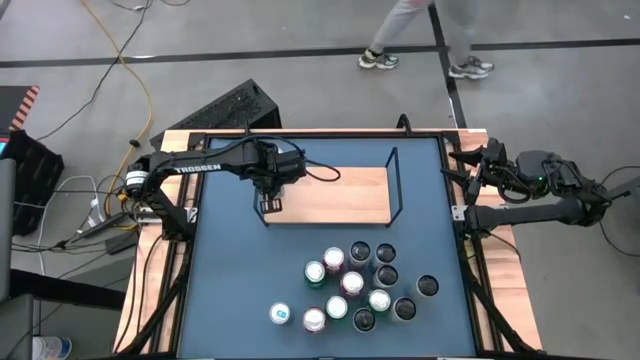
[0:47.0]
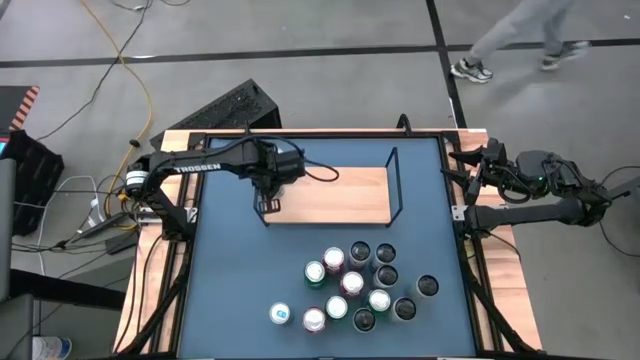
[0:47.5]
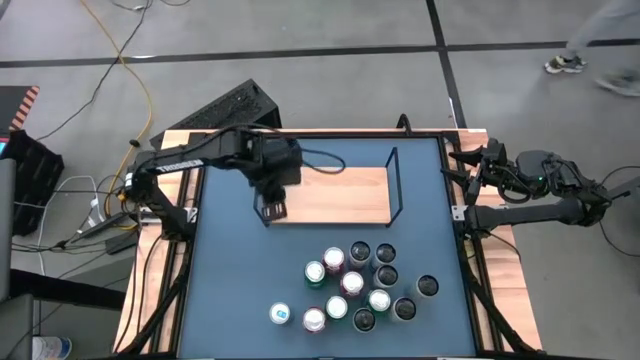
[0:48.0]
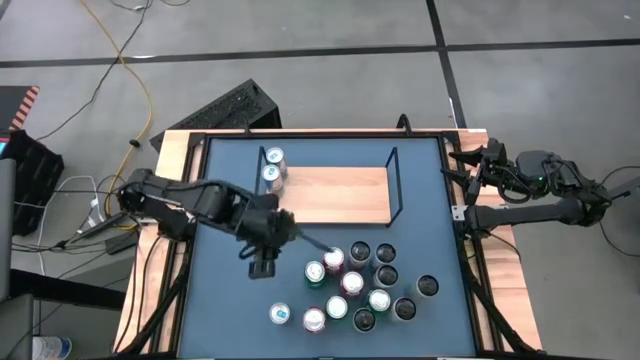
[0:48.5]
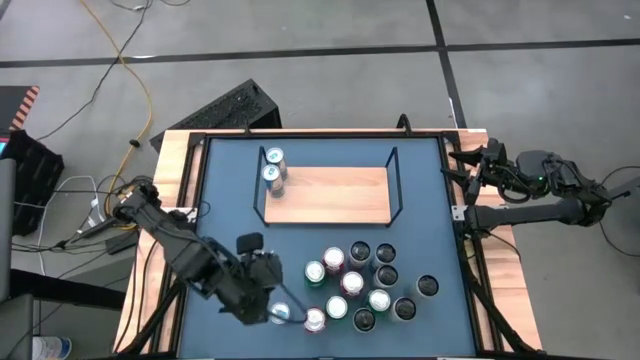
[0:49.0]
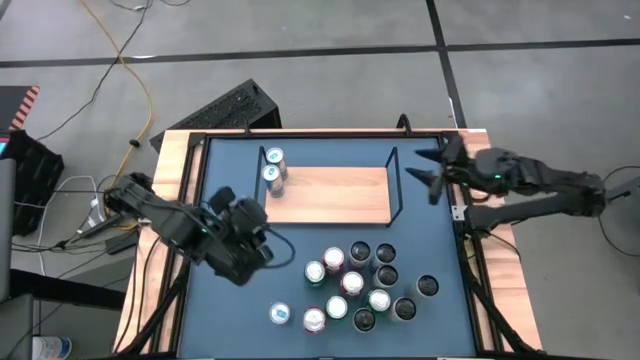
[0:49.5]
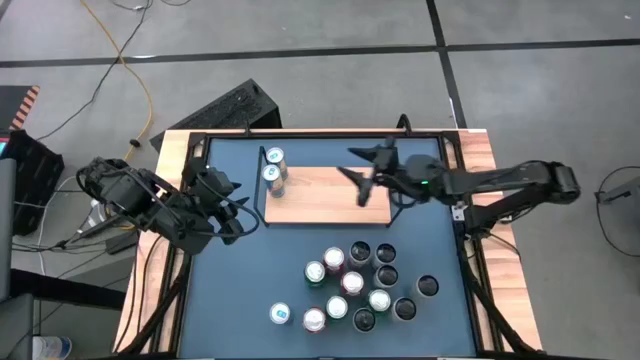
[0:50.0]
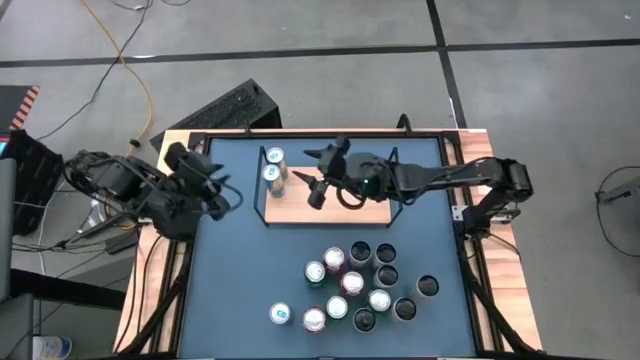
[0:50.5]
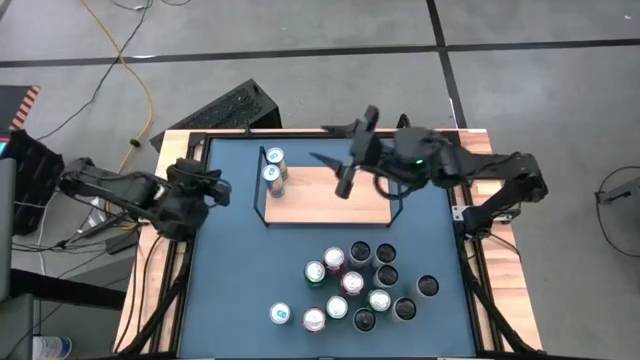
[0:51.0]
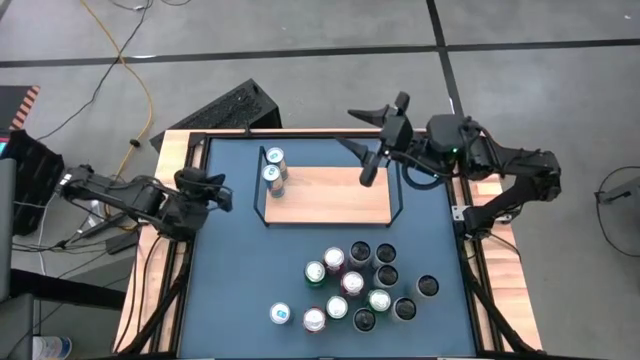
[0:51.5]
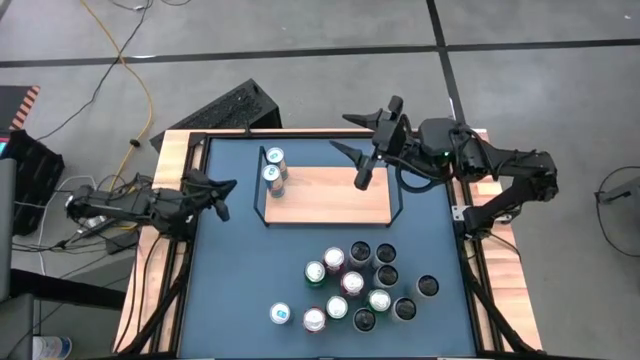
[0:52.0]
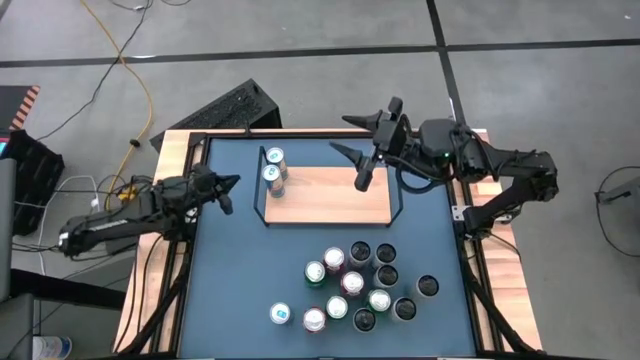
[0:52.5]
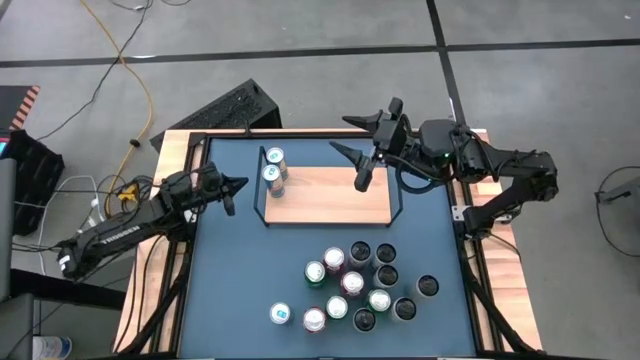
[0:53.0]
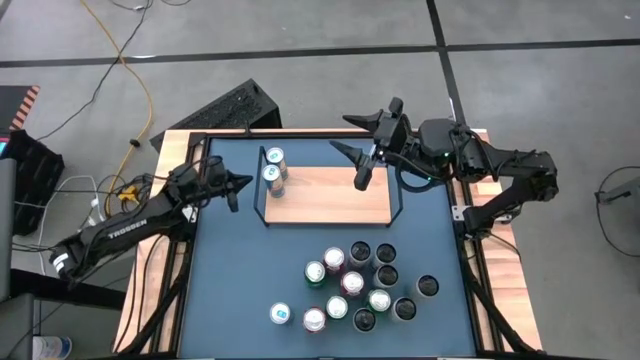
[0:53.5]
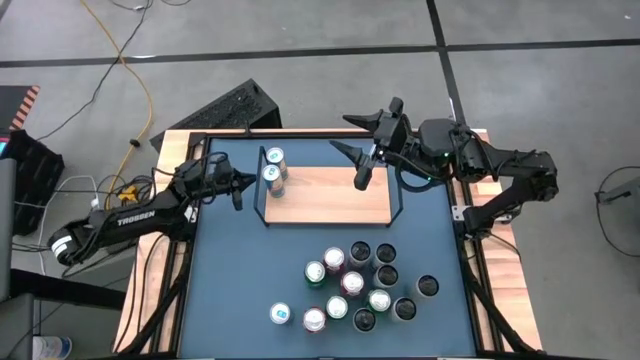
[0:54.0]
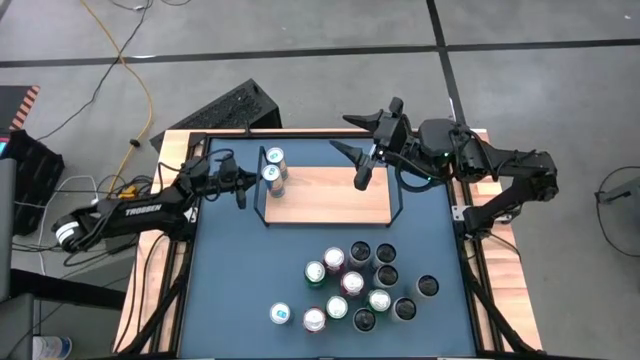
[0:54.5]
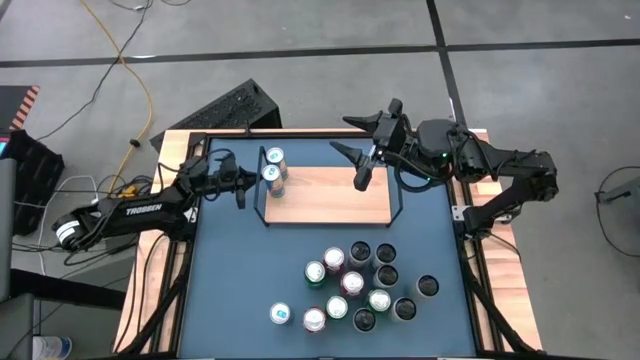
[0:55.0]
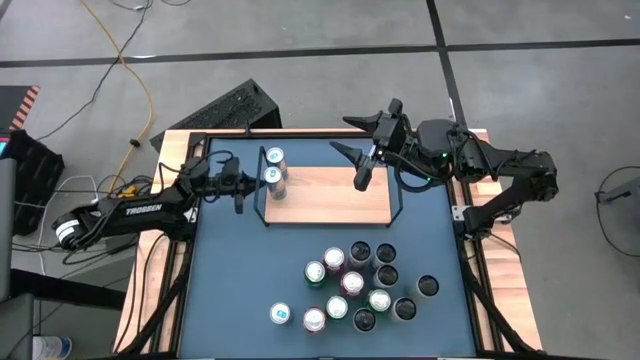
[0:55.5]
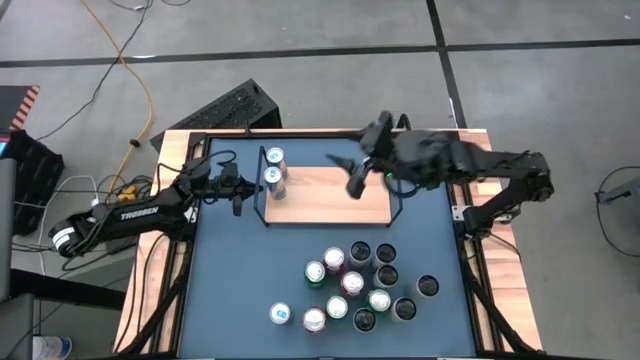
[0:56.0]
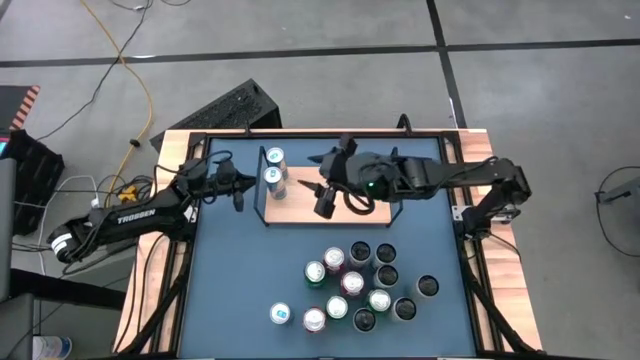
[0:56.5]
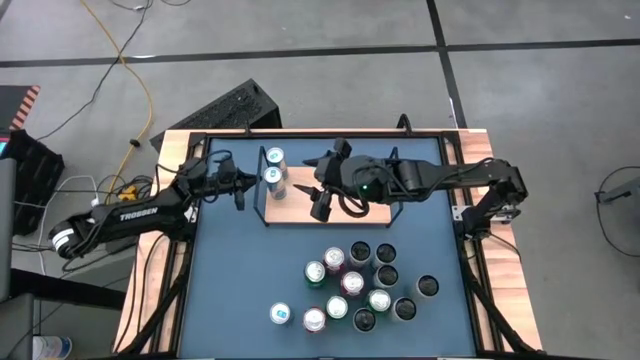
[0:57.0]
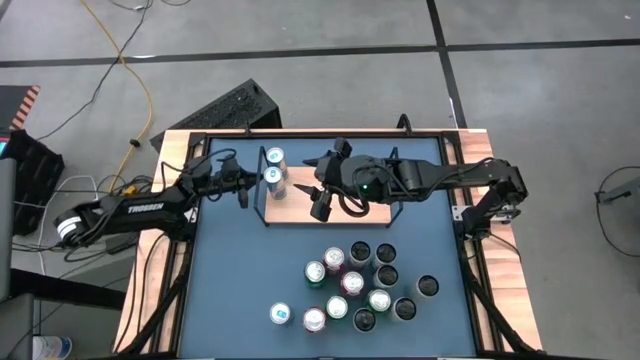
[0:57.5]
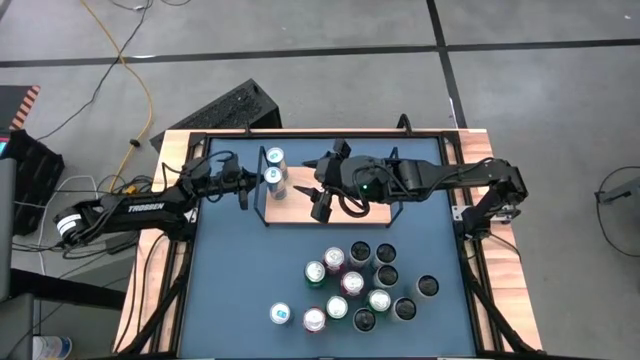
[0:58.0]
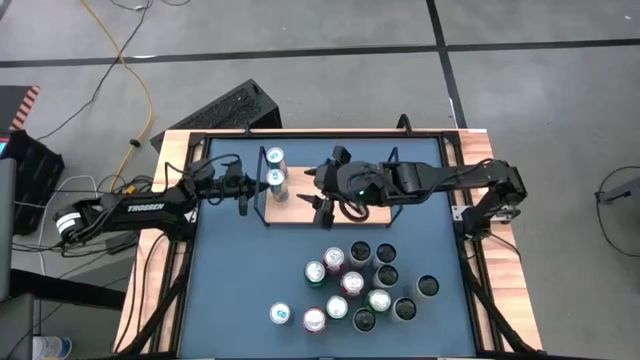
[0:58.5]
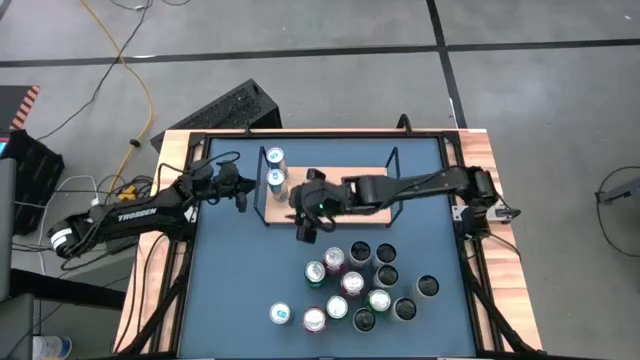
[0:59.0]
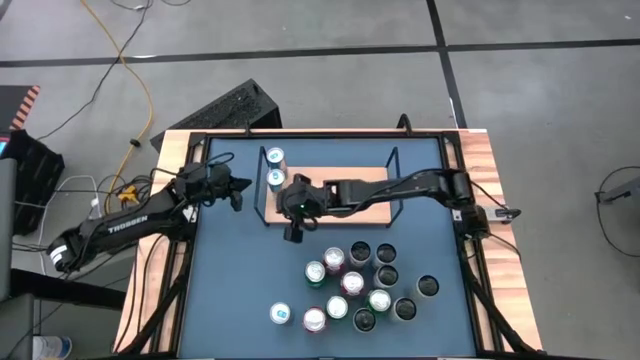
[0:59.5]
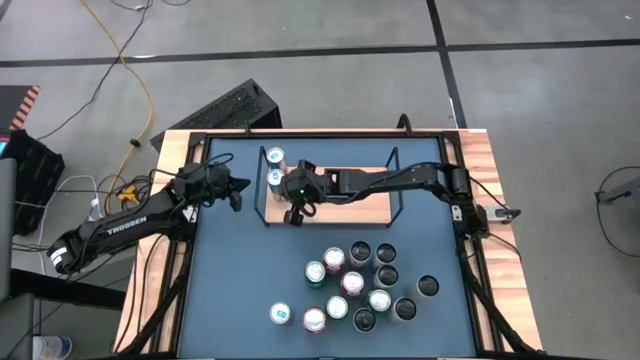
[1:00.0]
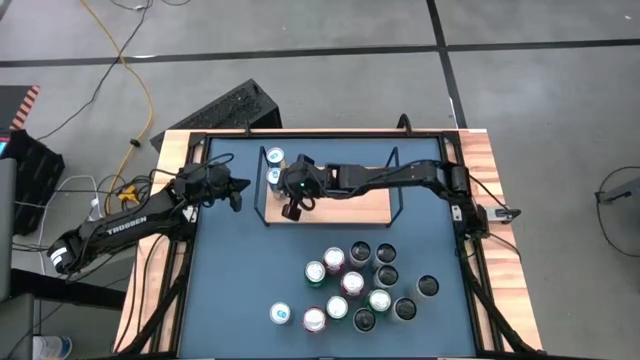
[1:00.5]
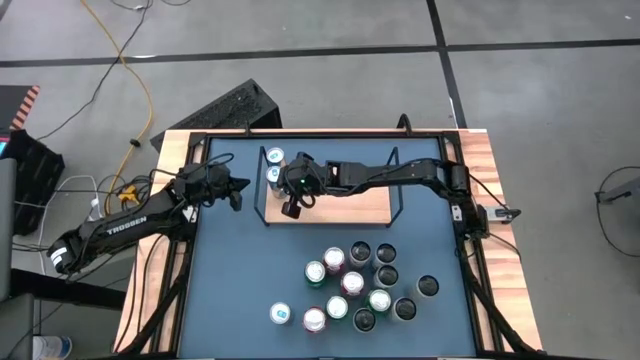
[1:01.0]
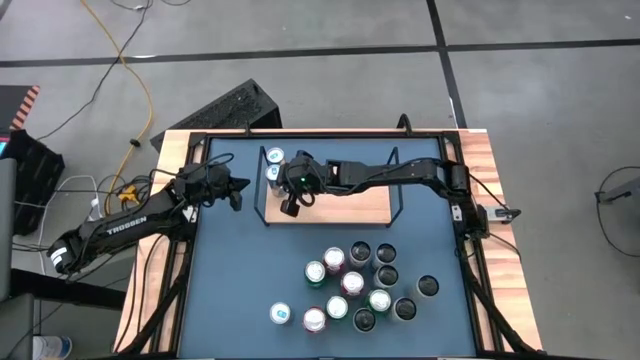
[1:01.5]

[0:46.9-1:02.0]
Task: Place canned beverage on shelf
Put the top blue soda can on the shelf aligned with the other blue soda can
